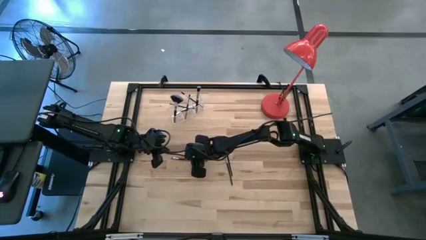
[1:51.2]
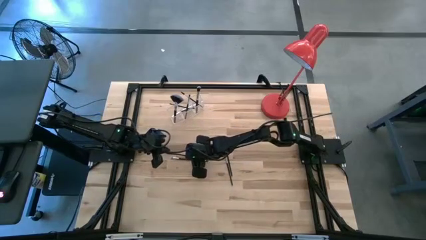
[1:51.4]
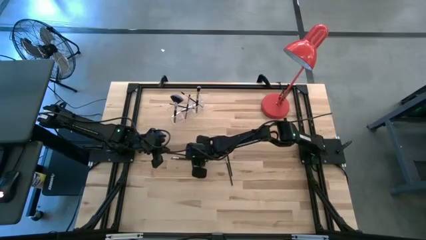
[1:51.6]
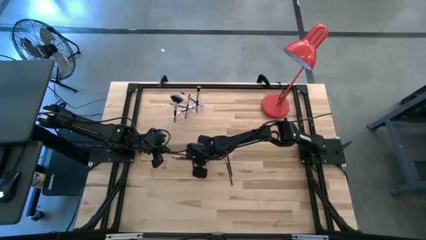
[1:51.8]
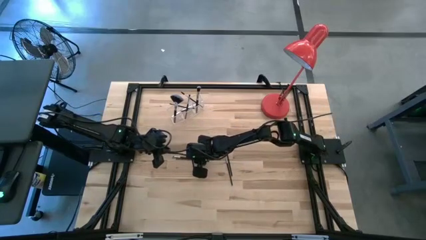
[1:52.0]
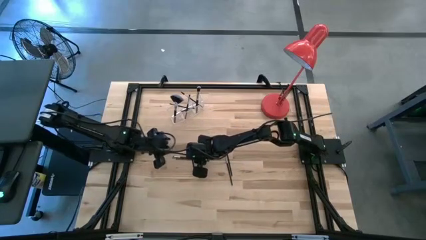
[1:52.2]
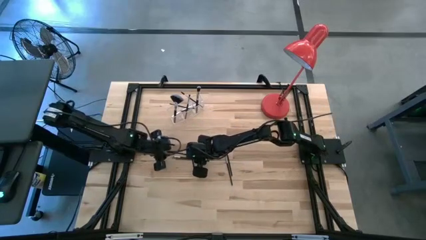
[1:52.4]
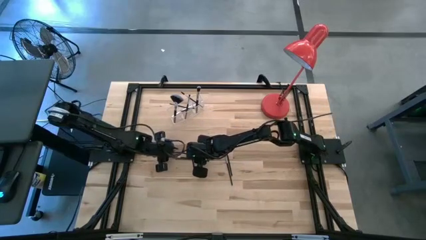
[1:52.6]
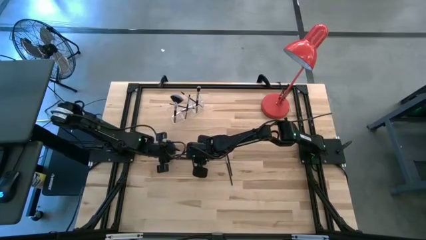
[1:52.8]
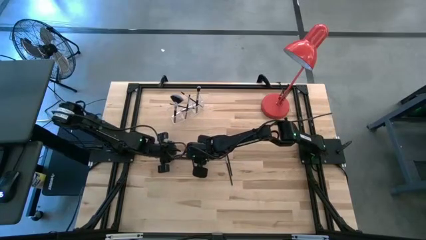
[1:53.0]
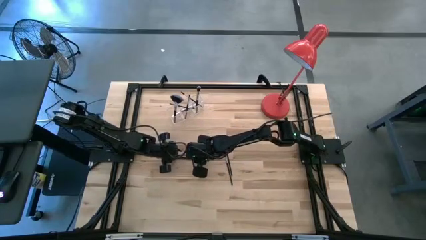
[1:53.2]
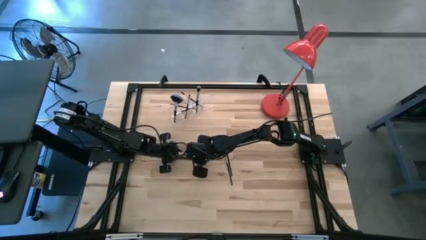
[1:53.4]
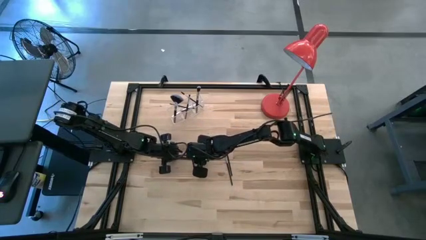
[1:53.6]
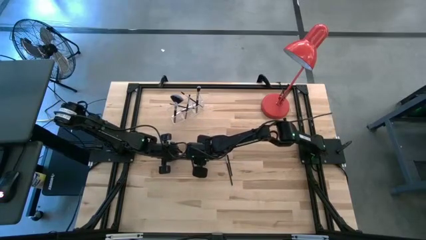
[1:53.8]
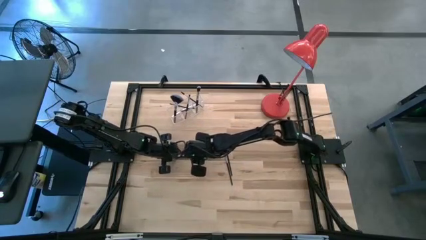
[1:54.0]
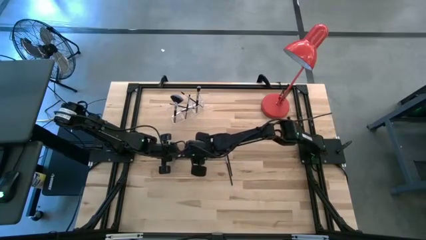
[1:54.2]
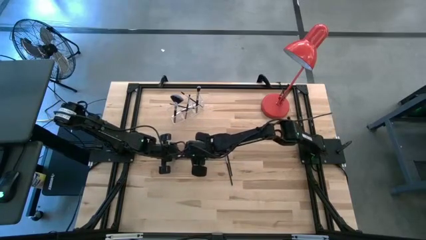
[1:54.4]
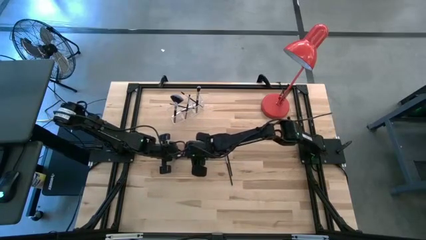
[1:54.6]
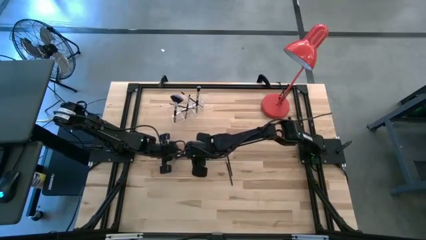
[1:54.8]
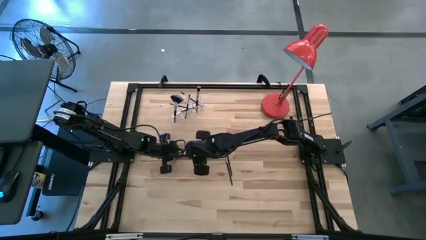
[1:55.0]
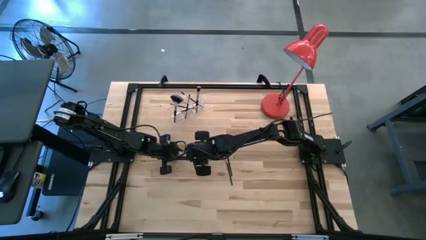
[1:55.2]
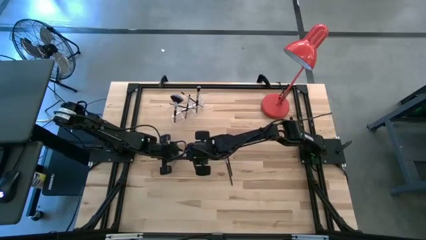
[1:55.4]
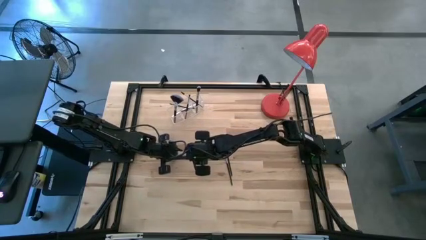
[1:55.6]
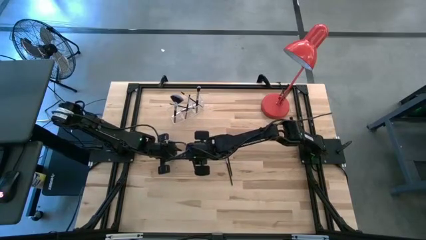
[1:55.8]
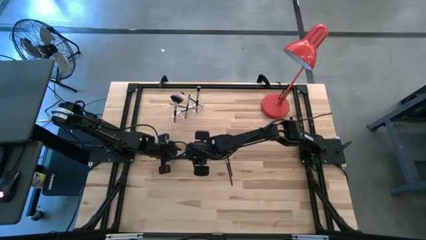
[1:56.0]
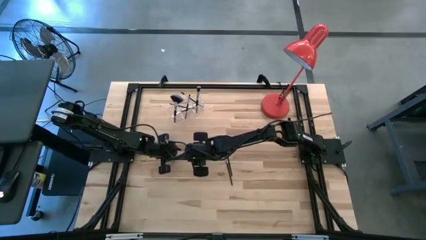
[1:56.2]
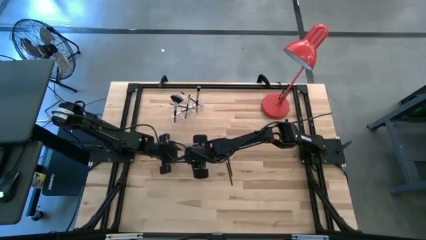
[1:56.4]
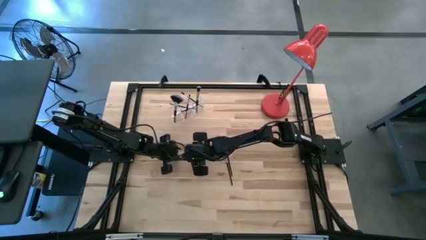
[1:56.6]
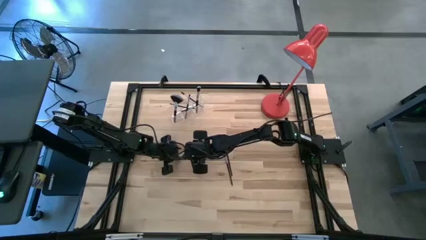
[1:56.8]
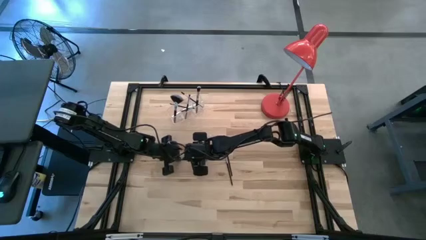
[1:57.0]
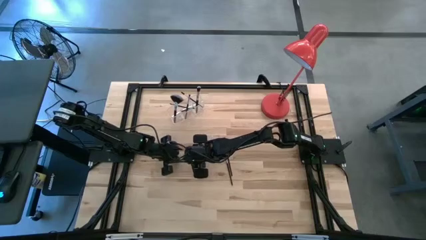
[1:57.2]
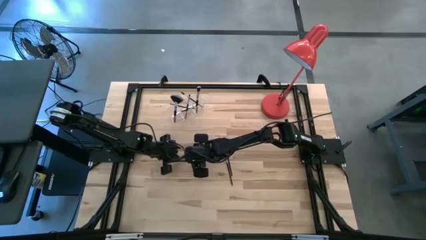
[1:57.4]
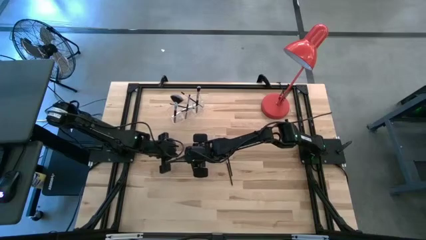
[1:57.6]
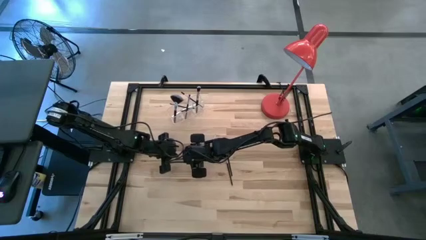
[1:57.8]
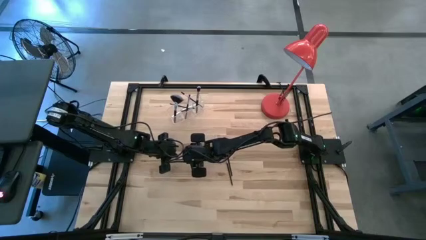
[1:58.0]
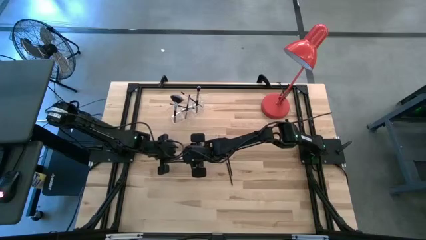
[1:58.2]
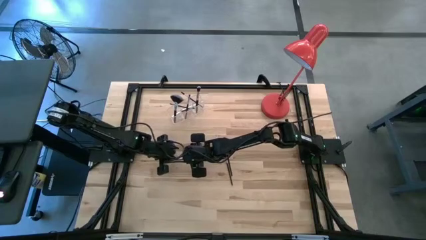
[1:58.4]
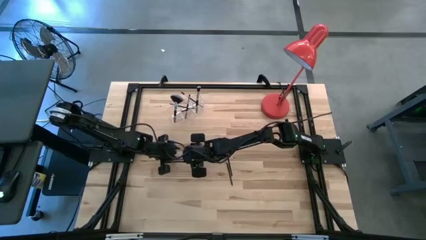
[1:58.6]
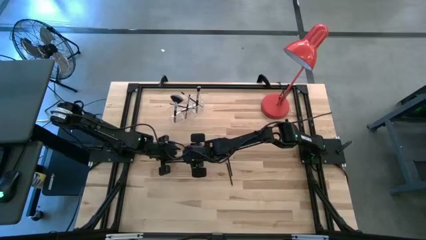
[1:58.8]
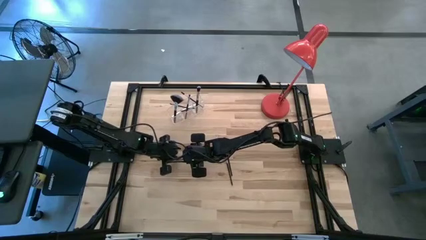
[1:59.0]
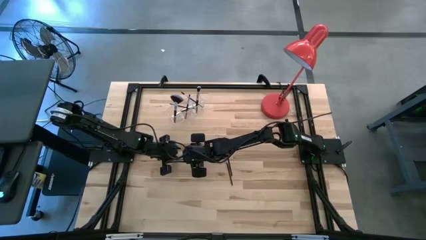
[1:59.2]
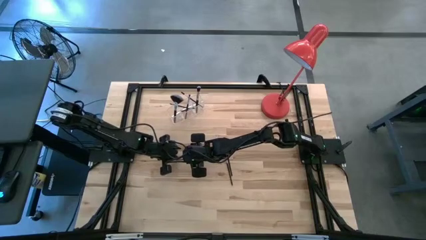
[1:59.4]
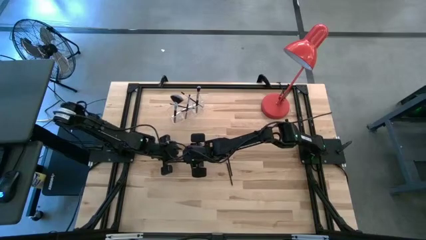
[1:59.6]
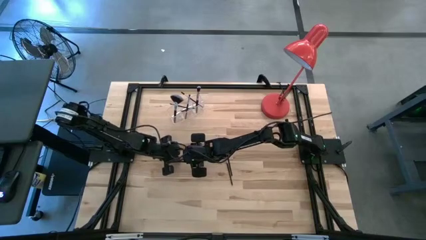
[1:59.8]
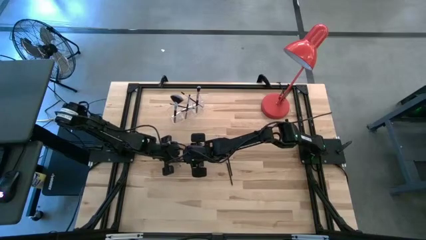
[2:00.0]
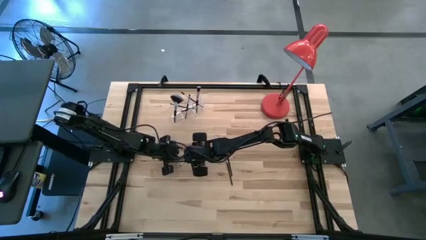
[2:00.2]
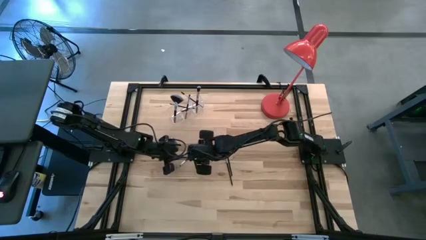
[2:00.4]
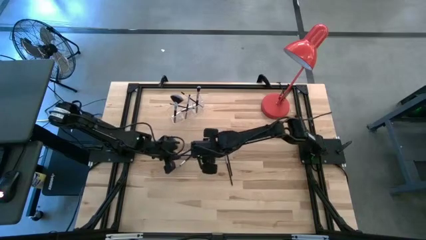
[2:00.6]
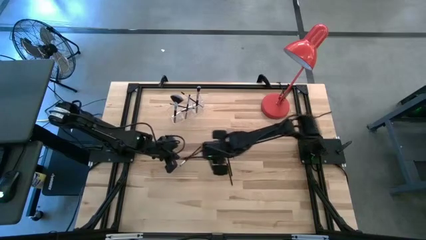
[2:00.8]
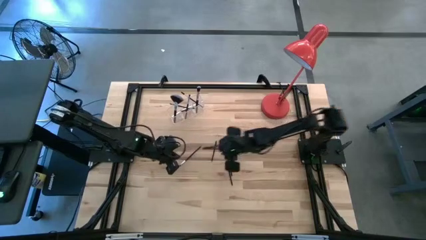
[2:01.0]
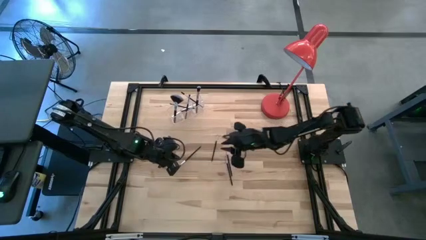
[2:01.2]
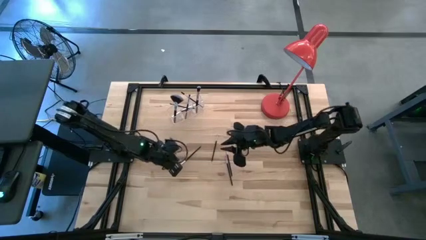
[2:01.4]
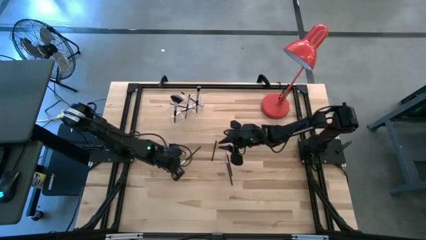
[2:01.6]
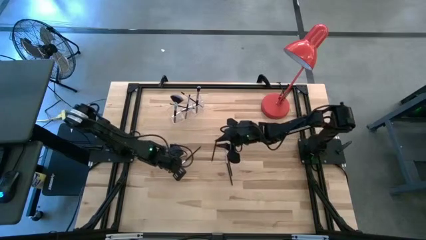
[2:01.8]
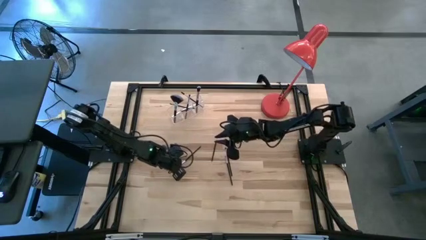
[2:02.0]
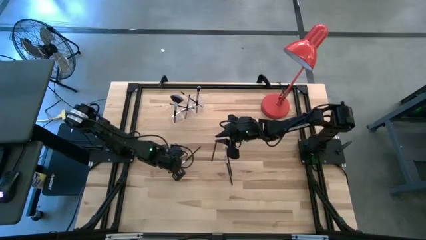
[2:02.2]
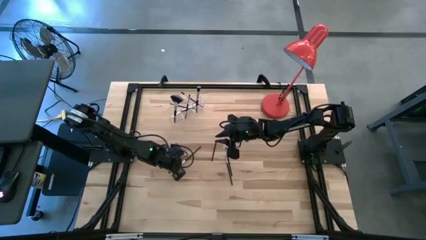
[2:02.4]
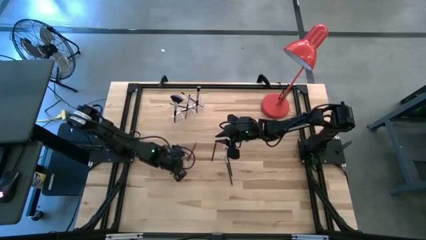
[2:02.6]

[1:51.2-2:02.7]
Task: Put items in baskets/containers
Put the eyeshadow brush into the transparent organizer

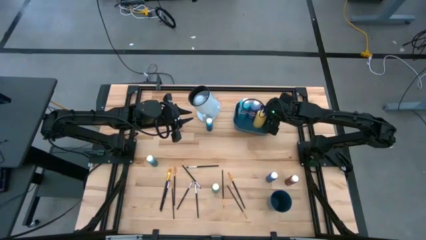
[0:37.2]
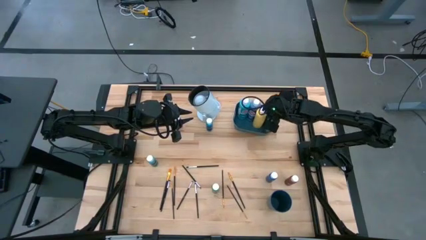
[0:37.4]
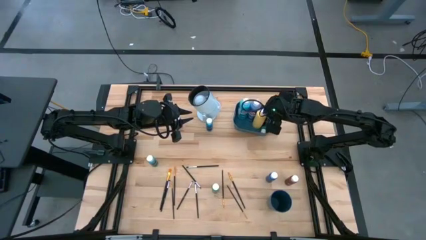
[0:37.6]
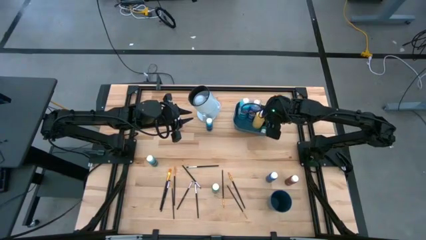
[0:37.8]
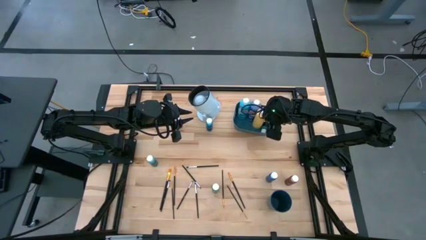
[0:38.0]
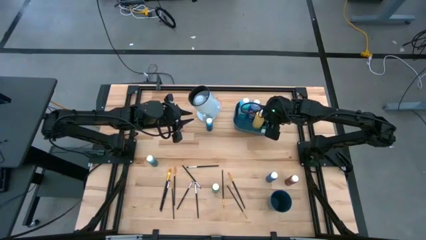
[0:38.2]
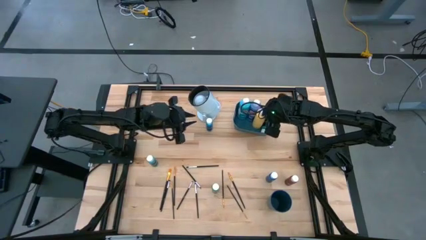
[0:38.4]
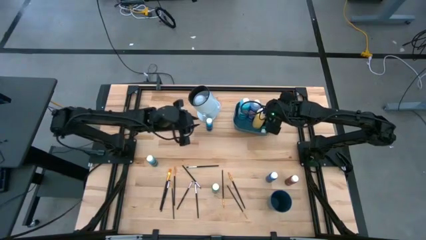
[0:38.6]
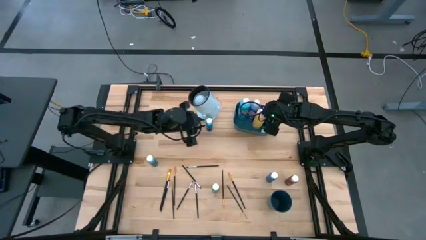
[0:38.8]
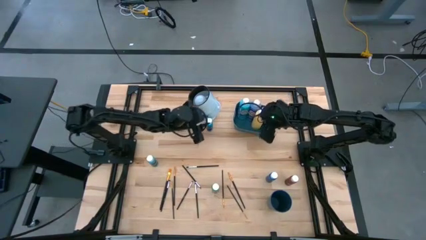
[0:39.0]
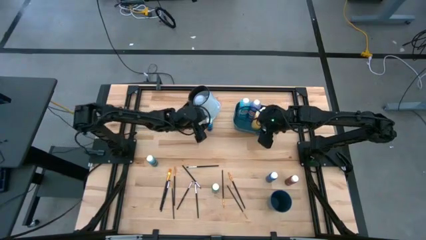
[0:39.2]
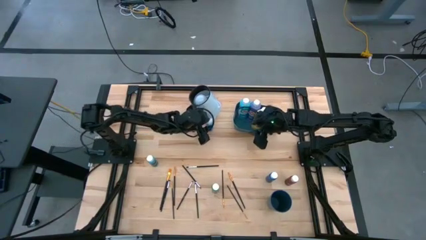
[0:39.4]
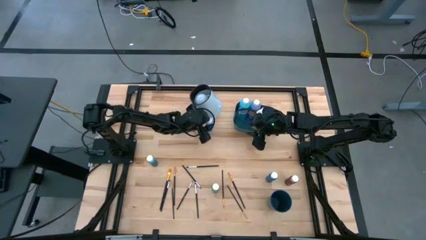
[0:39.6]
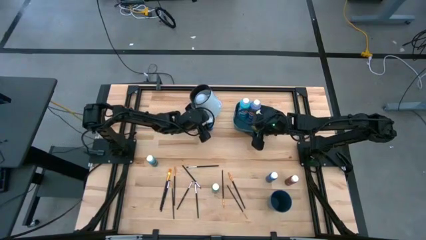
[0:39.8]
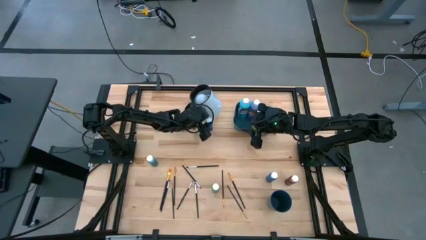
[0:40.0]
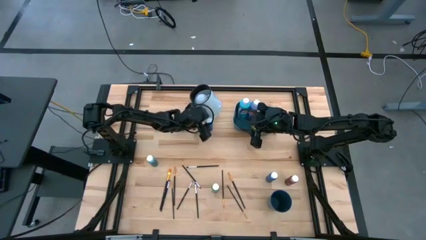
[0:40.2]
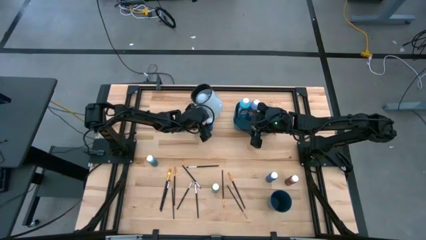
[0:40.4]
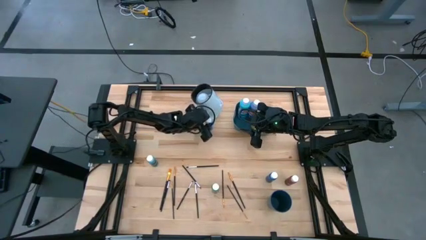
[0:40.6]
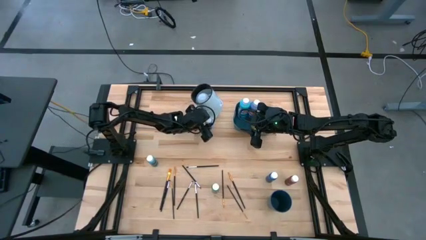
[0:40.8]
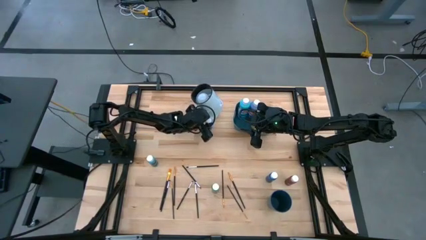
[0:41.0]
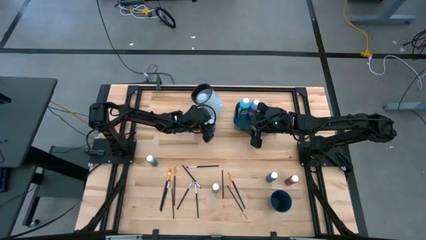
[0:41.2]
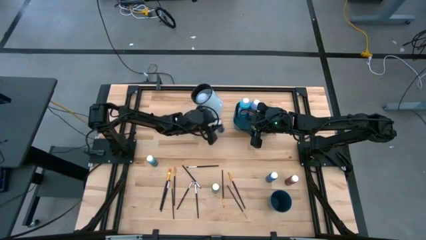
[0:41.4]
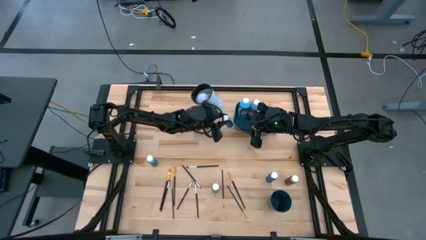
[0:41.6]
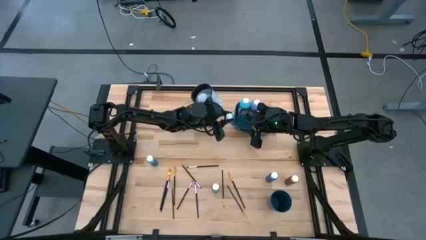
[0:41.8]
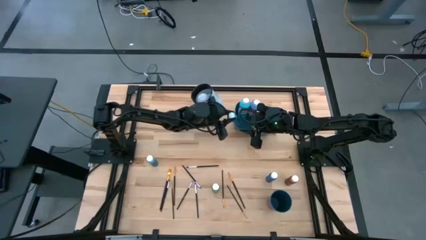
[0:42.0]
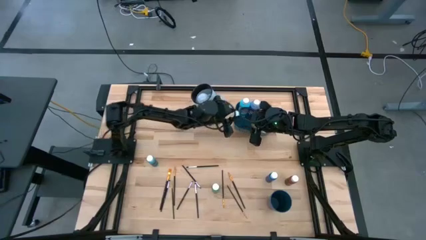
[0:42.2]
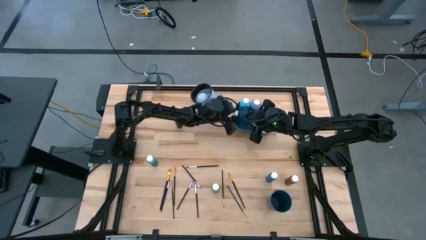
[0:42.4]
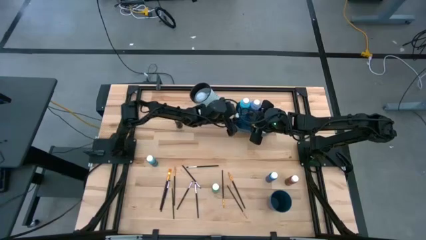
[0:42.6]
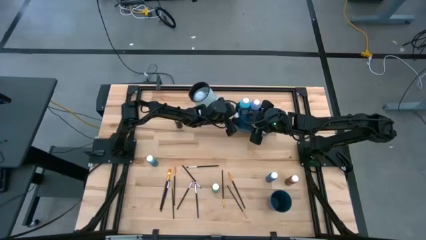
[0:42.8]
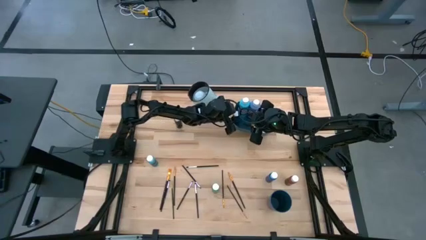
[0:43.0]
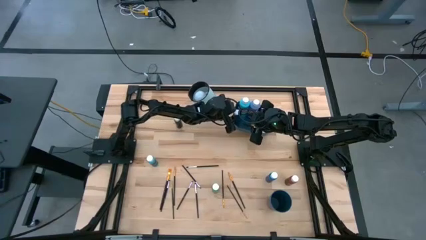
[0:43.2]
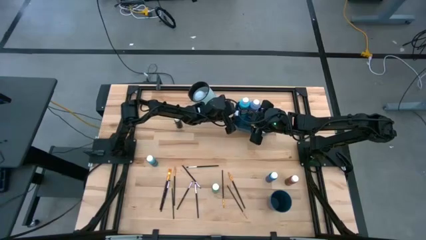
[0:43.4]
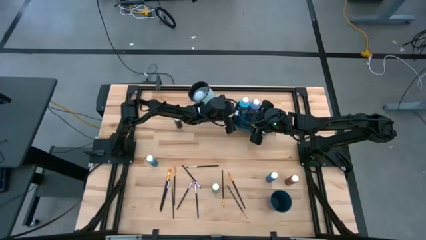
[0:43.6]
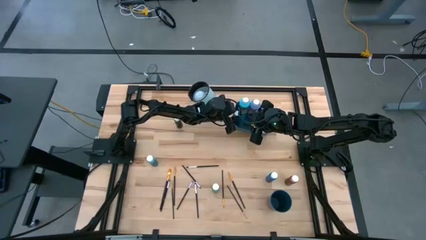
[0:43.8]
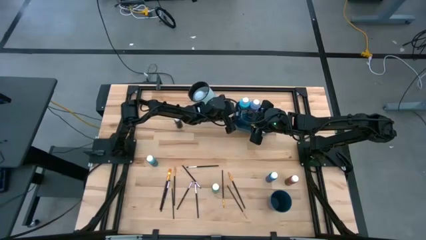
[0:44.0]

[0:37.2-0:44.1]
Task: Pick & Place Paint Supplies
Put the blue paint bottle into the blue bin
